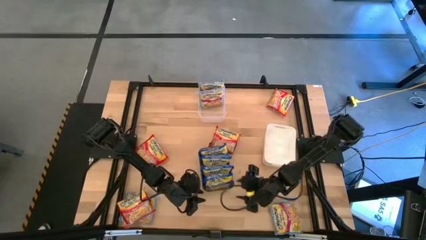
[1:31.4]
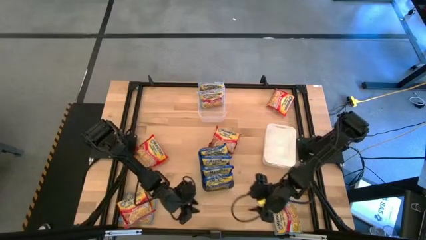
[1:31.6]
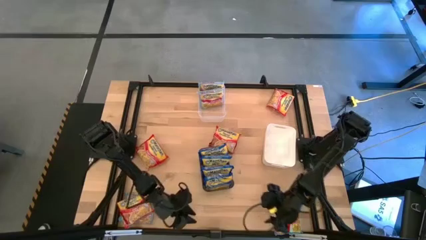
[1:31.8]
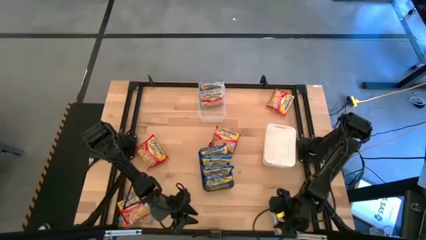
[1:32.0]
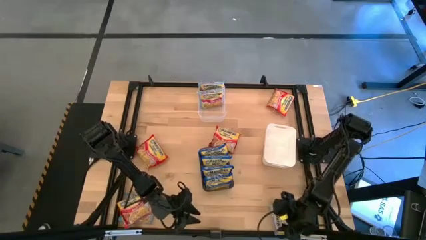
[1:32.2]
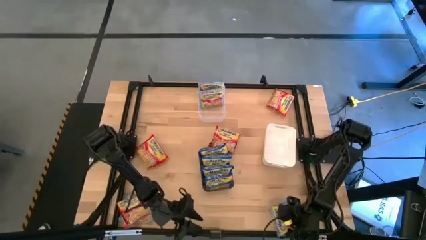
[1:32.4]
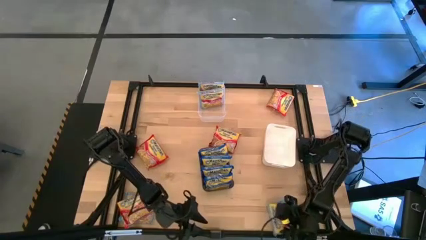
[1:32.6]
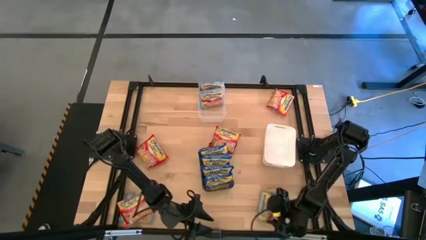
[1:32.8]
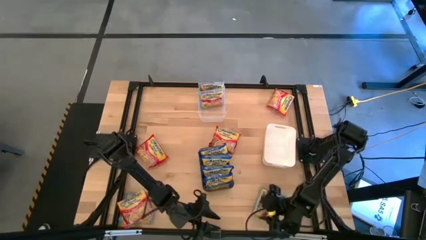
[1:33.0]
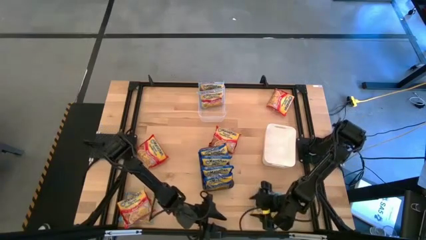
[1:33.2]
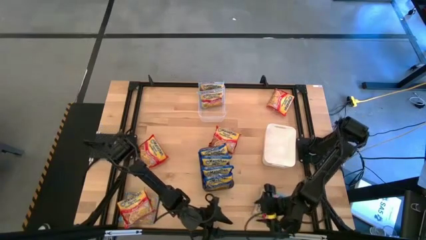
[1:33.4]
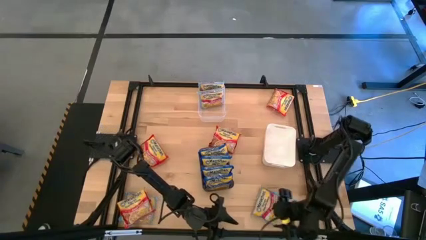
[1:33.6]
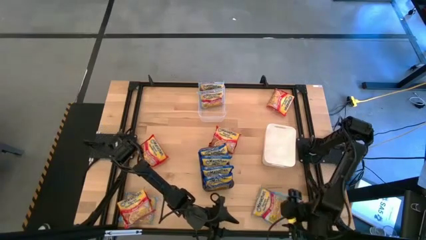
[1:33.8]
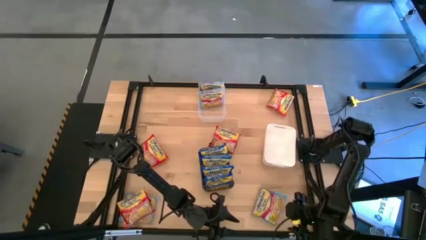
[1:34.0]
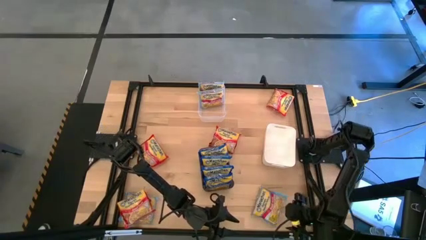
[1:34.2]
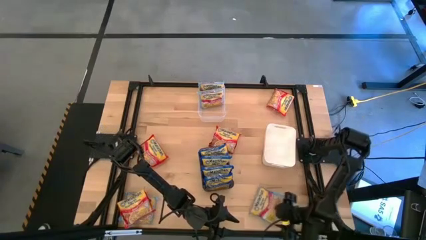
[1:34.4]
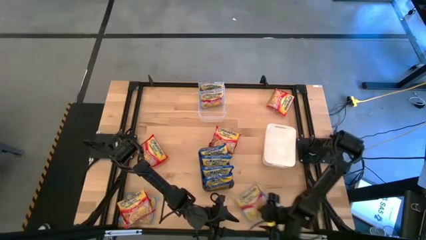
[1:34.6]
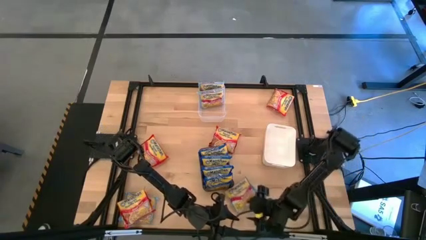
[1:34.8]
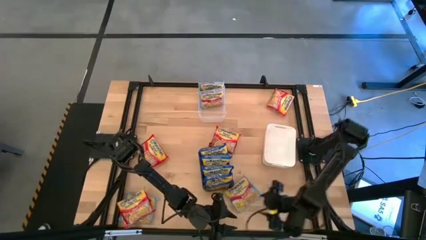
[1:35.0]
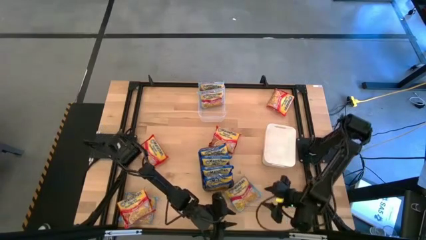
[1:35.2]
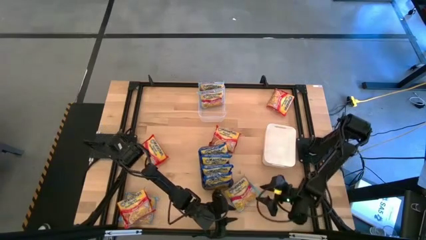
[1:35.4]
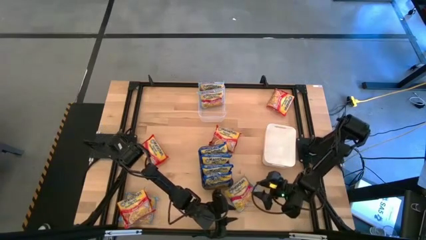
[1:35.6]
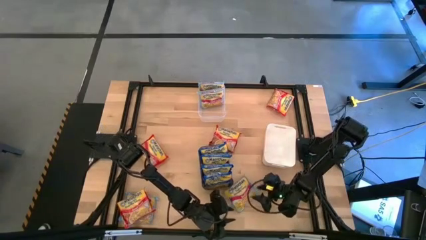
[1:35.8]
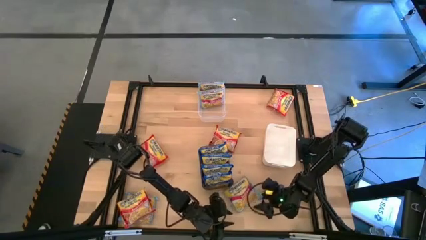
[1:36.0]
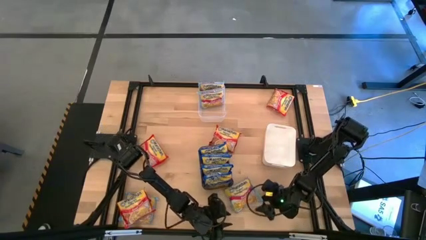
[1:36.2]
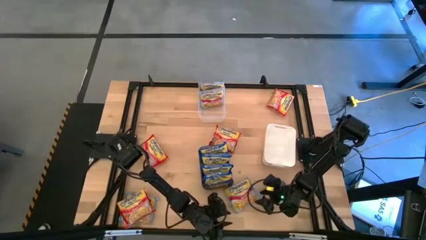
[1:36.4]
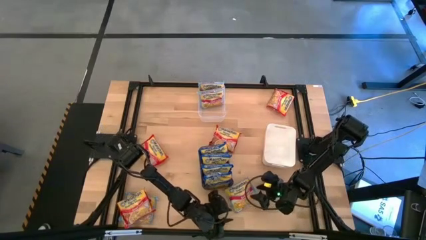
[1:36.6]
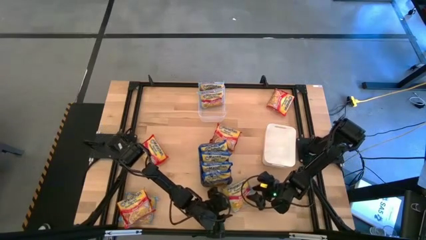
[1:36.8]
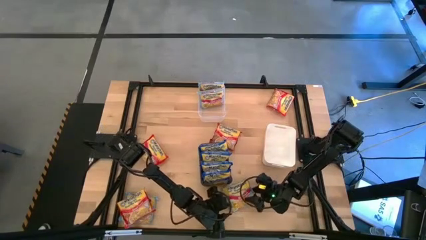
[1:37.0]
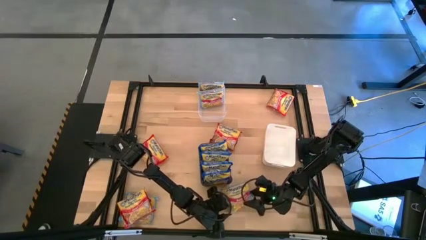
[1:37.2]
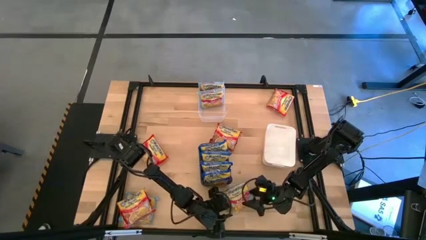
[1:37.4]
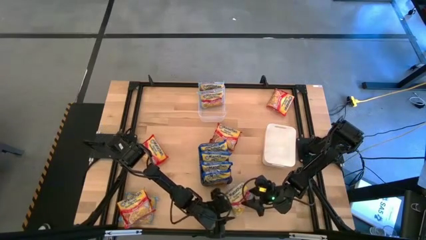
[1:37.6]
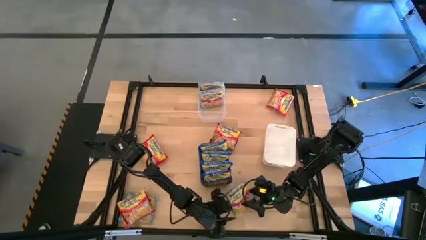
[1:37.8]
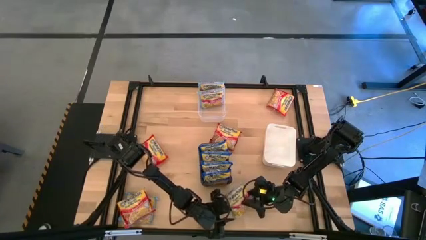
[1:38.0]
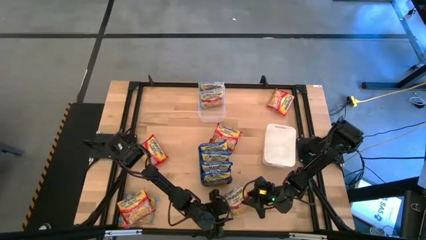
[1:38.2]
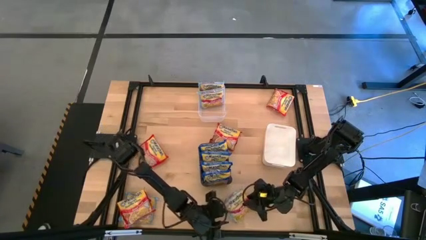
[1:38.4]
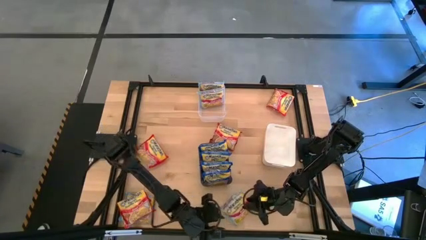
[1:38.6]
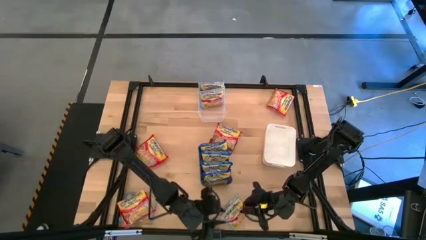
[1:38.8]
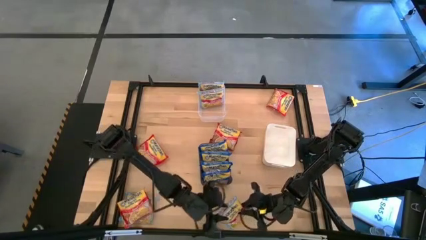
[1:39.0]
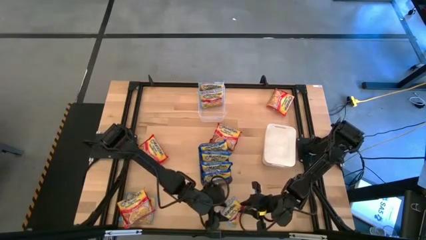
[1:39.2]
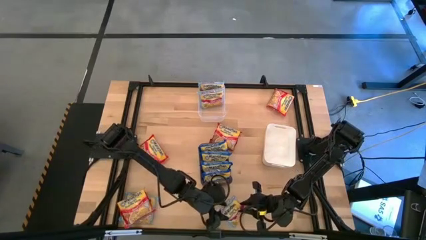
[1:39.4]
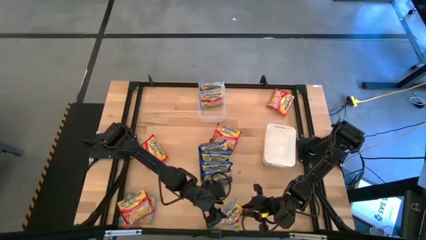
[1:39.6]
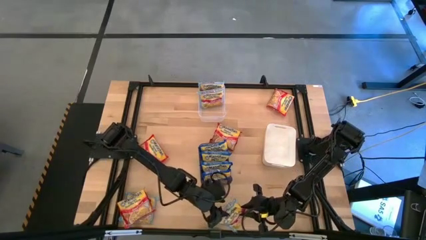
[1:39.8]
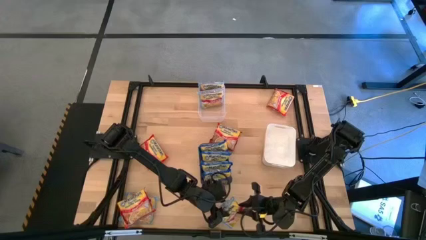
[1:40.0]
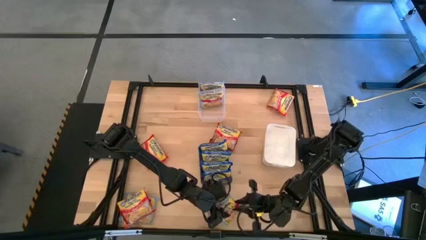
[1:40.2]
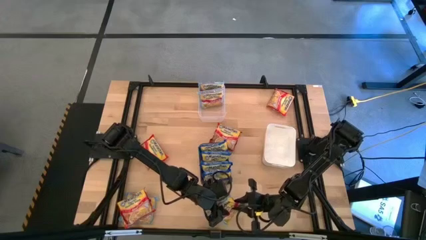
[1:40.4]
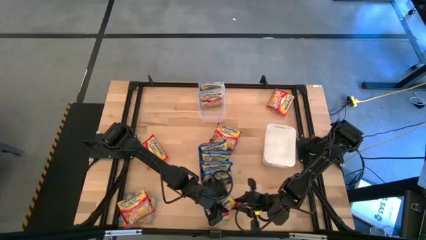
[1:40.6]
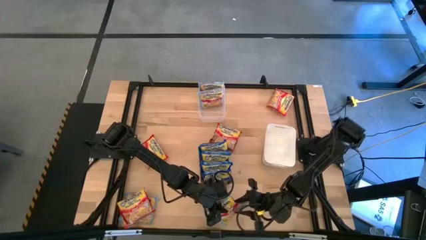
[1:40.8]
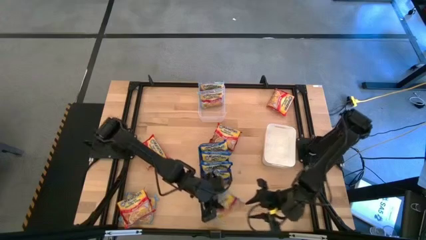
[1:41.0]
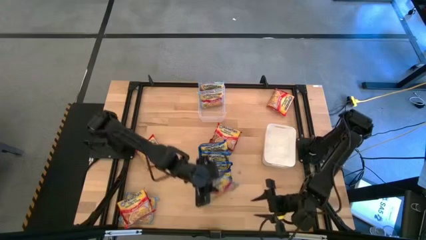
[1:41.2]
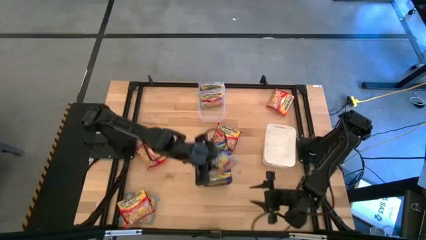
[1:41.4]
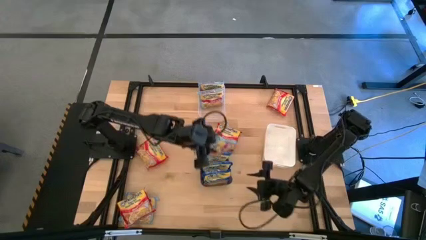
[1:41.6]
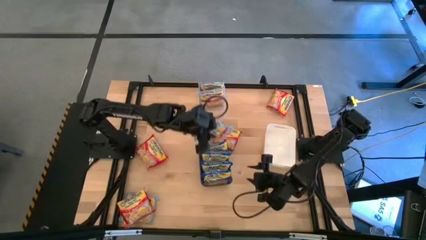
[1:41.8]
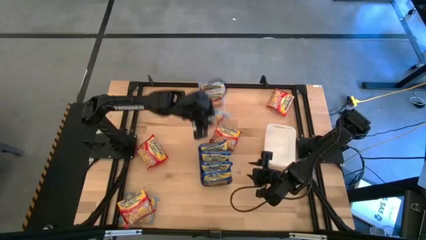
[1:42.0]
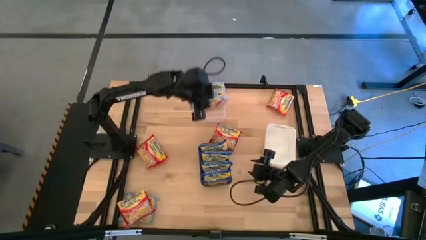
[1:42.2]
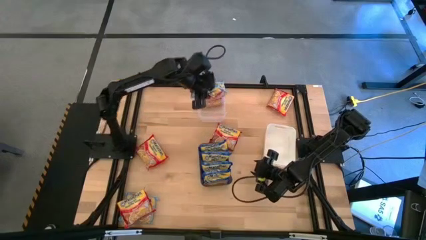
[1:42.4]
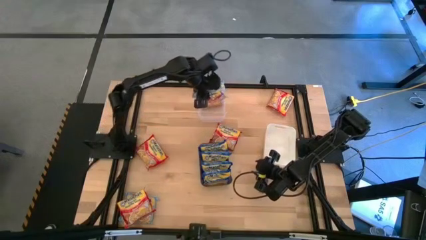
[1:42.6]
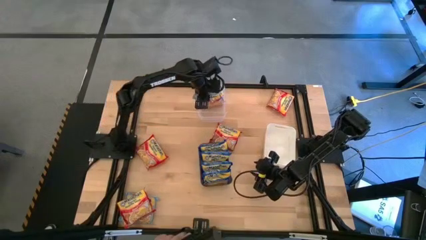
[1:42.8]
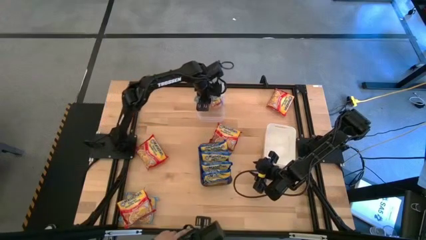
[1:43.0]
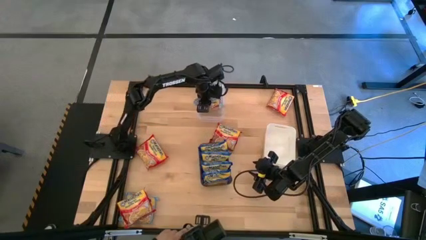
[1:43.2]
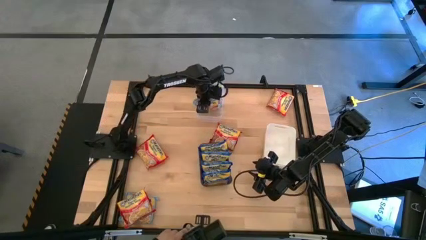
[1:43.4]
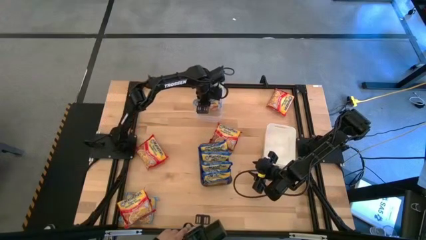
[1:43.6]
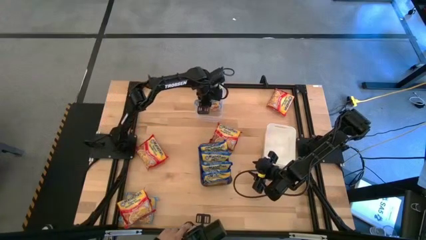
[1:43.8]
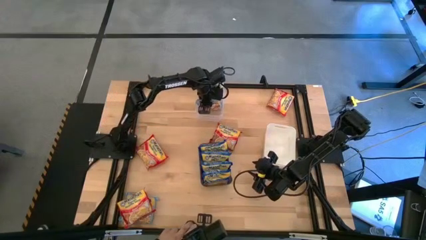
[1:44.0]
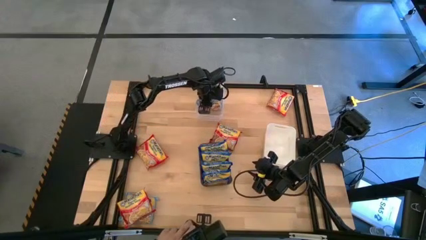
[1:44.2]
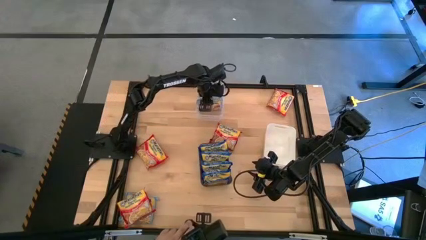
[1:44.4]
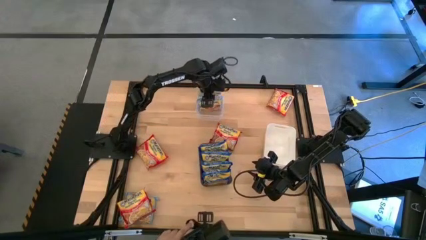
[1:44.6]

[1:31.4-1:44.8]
Task: Sort Maruchan noodles
Put the right light blue noodle pack into the transparent bin
